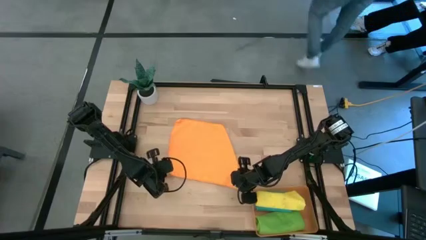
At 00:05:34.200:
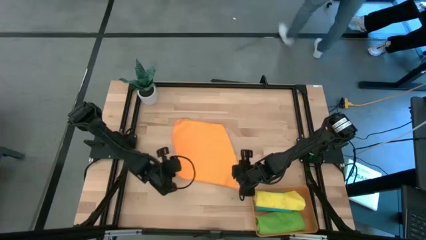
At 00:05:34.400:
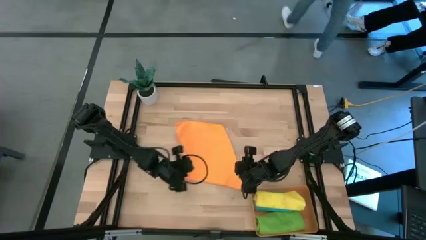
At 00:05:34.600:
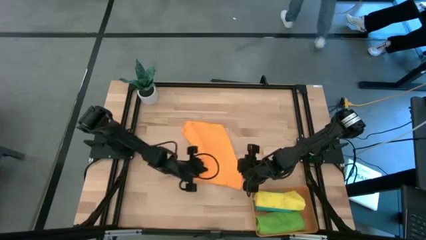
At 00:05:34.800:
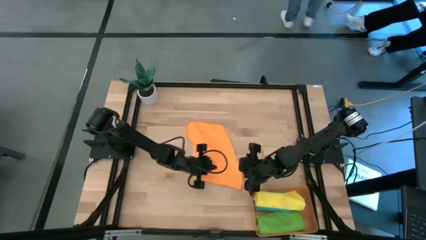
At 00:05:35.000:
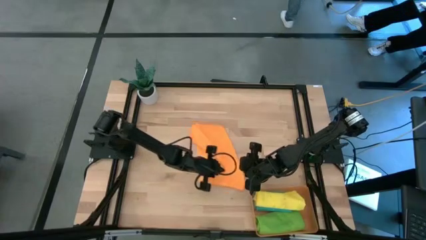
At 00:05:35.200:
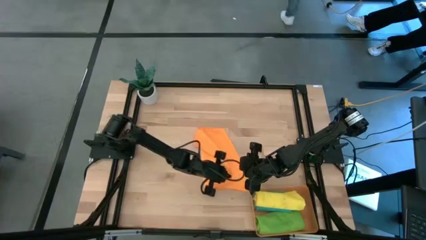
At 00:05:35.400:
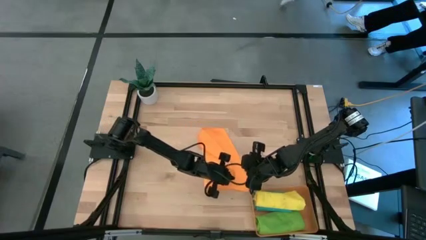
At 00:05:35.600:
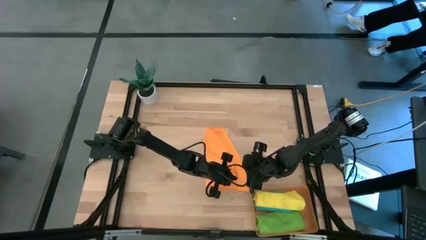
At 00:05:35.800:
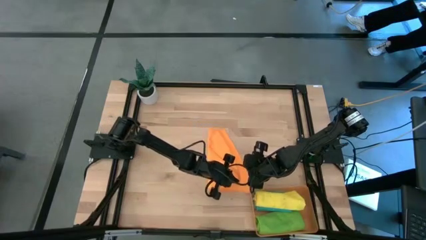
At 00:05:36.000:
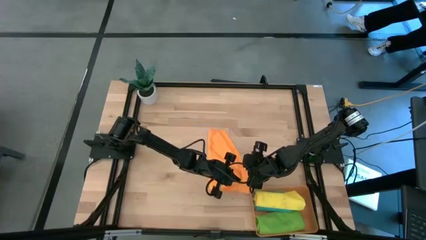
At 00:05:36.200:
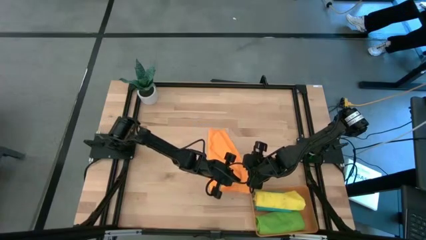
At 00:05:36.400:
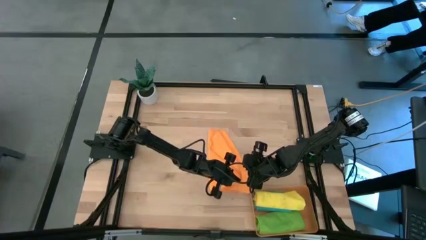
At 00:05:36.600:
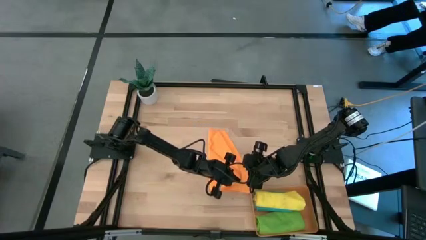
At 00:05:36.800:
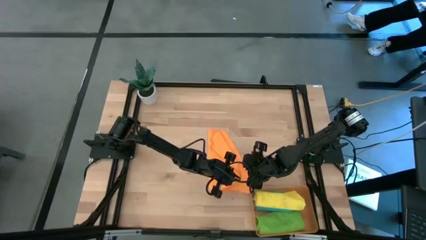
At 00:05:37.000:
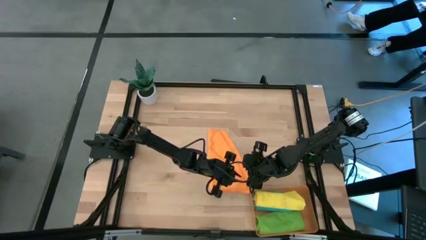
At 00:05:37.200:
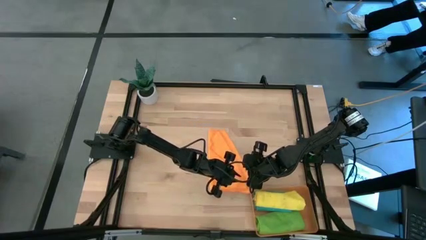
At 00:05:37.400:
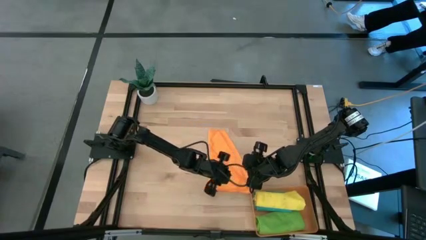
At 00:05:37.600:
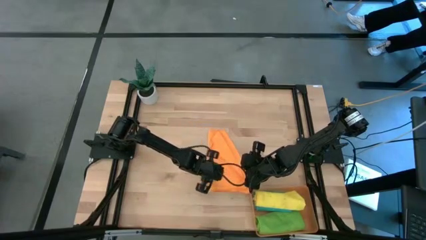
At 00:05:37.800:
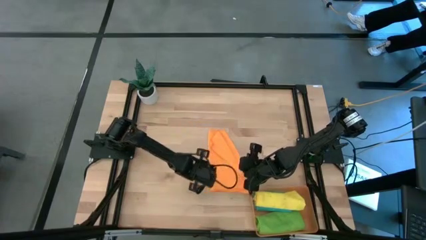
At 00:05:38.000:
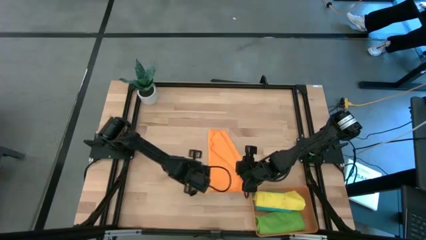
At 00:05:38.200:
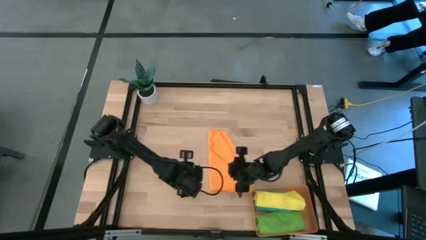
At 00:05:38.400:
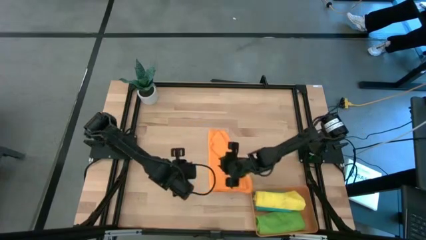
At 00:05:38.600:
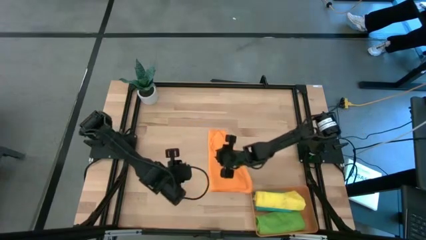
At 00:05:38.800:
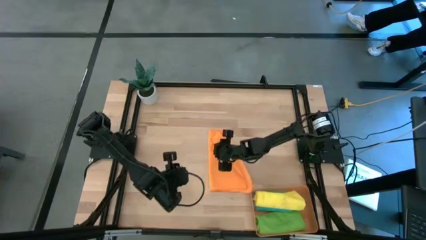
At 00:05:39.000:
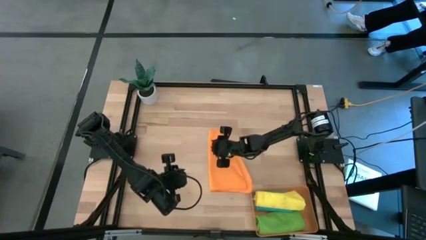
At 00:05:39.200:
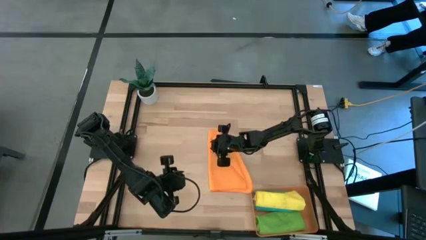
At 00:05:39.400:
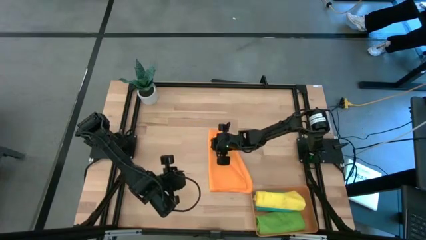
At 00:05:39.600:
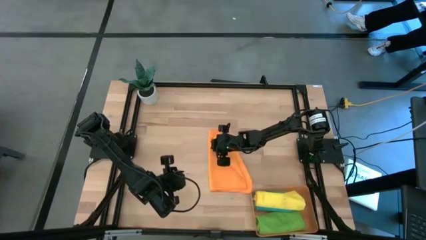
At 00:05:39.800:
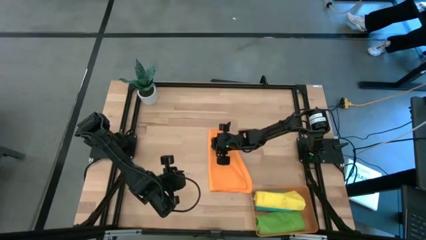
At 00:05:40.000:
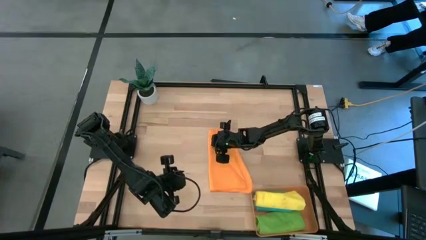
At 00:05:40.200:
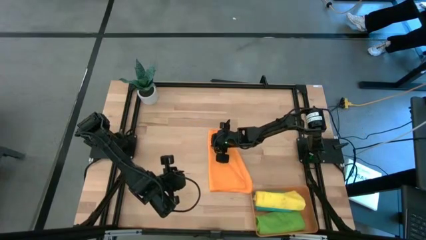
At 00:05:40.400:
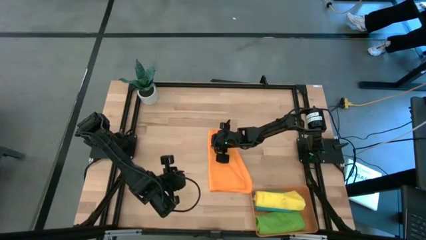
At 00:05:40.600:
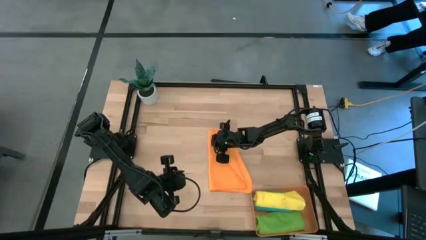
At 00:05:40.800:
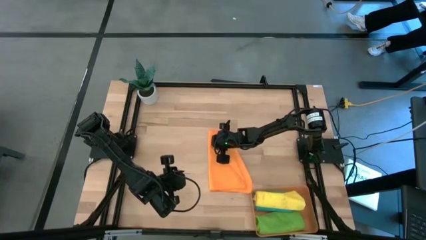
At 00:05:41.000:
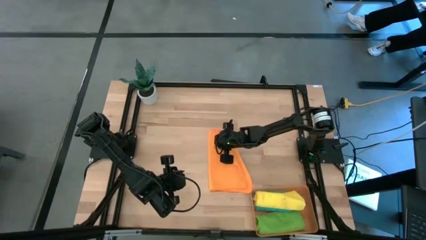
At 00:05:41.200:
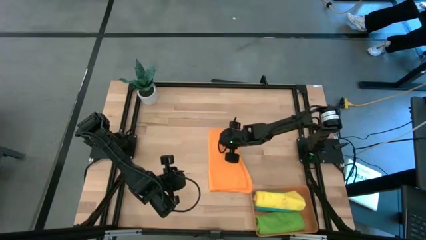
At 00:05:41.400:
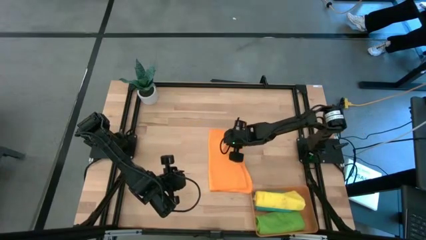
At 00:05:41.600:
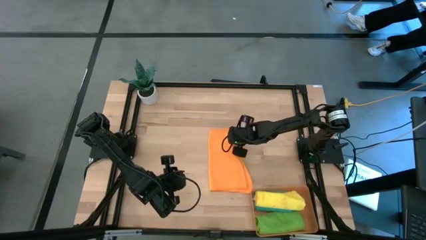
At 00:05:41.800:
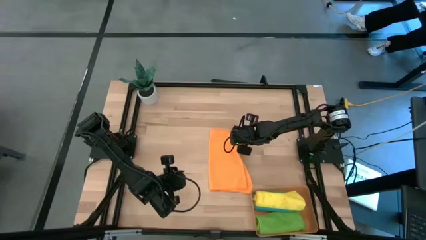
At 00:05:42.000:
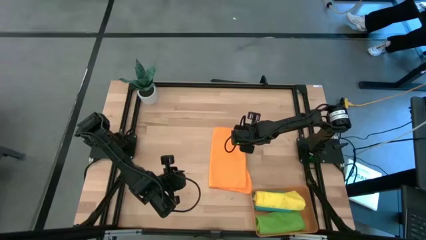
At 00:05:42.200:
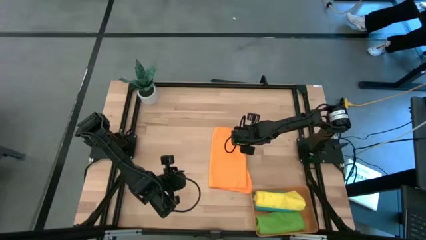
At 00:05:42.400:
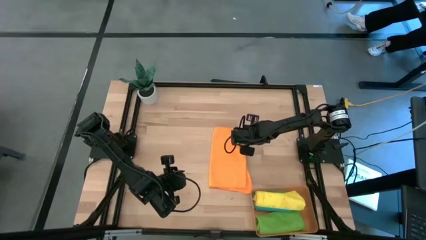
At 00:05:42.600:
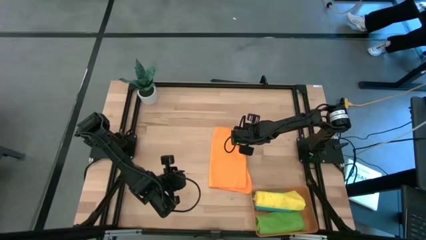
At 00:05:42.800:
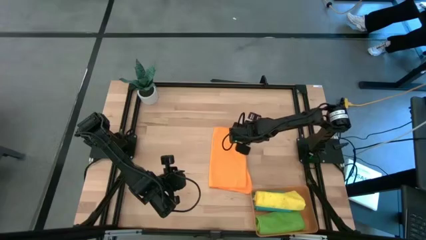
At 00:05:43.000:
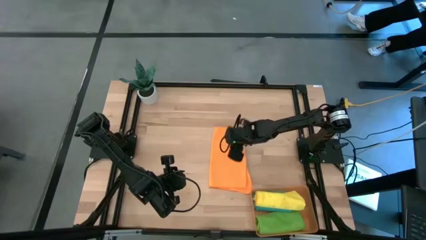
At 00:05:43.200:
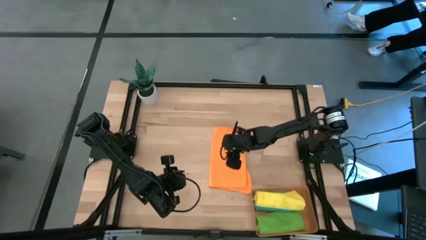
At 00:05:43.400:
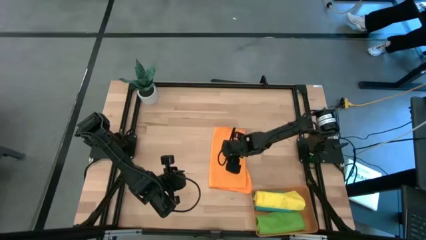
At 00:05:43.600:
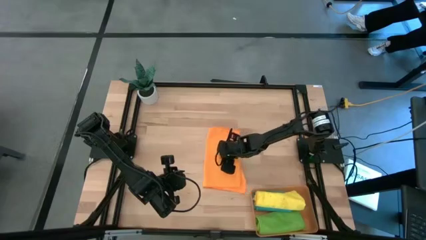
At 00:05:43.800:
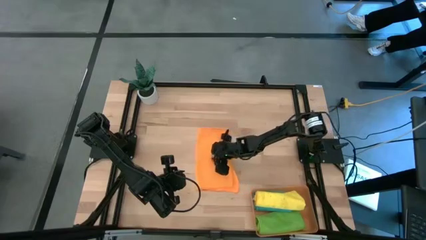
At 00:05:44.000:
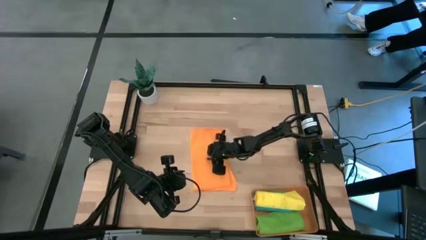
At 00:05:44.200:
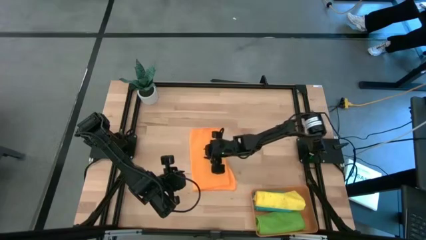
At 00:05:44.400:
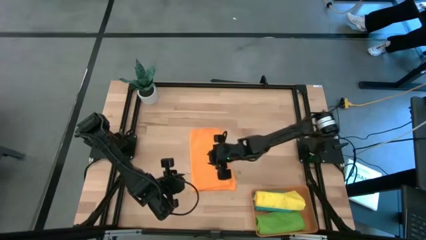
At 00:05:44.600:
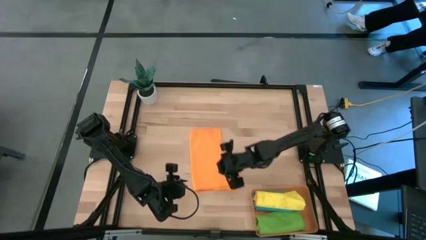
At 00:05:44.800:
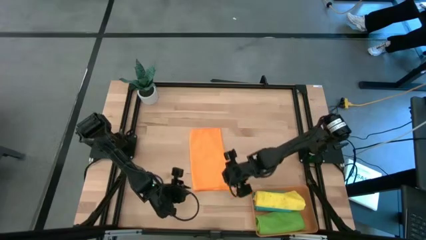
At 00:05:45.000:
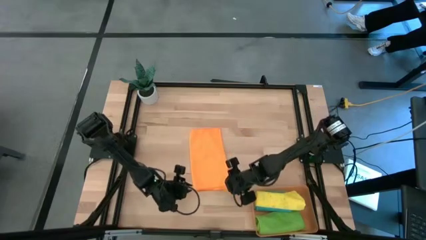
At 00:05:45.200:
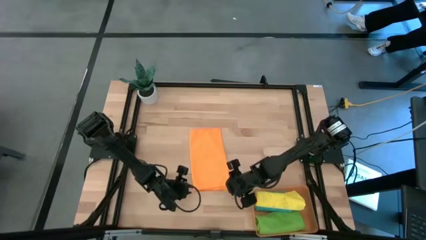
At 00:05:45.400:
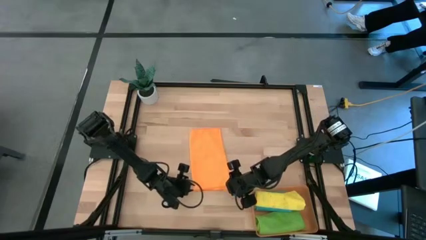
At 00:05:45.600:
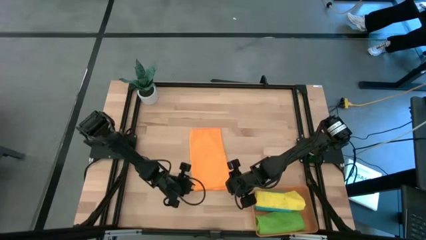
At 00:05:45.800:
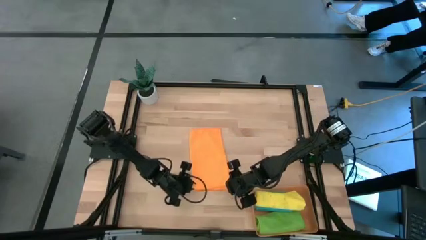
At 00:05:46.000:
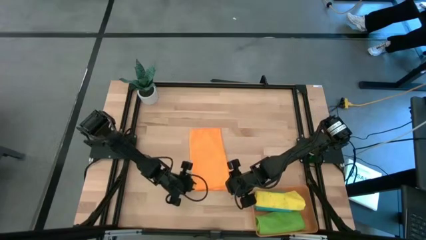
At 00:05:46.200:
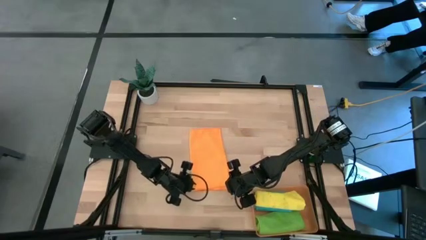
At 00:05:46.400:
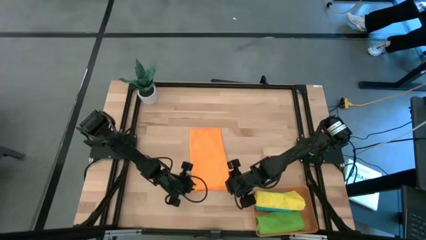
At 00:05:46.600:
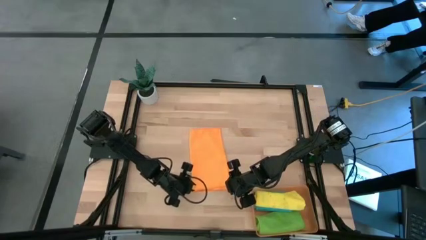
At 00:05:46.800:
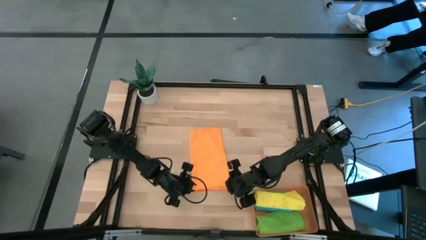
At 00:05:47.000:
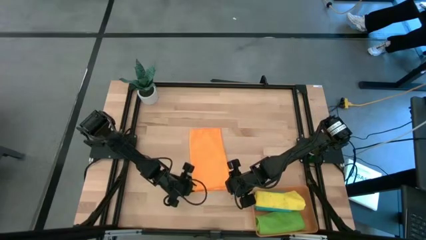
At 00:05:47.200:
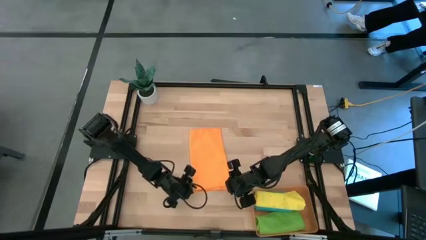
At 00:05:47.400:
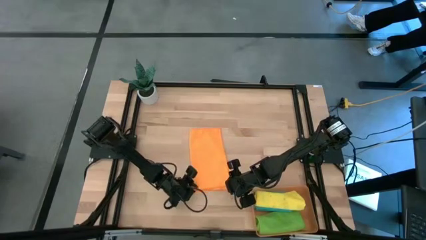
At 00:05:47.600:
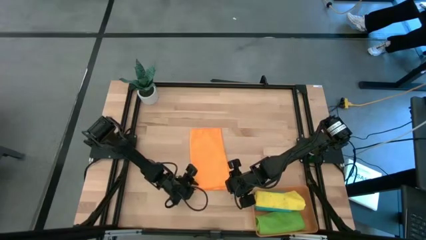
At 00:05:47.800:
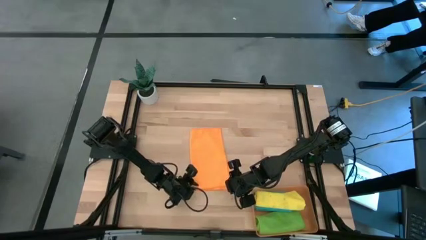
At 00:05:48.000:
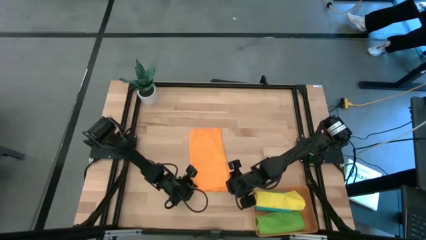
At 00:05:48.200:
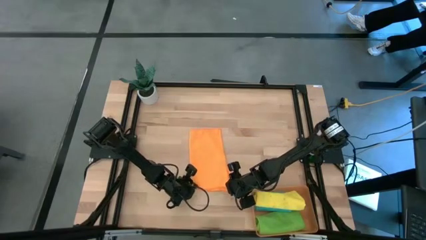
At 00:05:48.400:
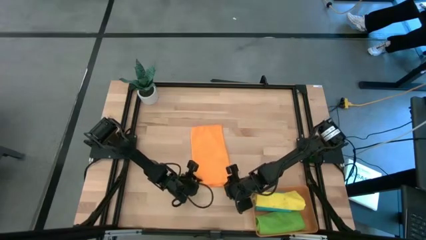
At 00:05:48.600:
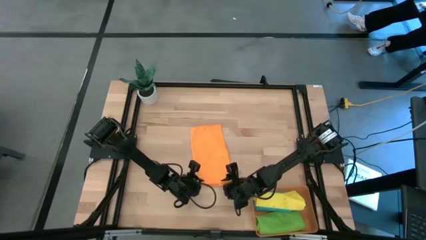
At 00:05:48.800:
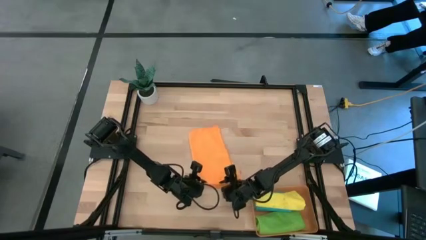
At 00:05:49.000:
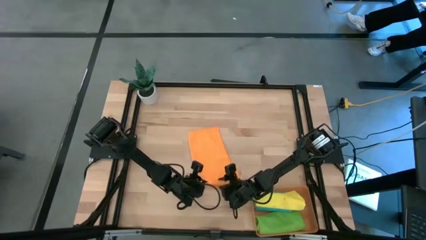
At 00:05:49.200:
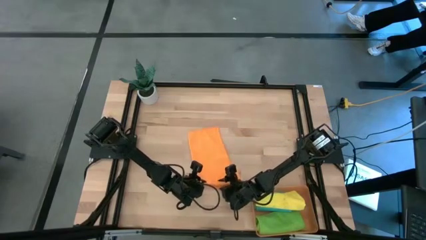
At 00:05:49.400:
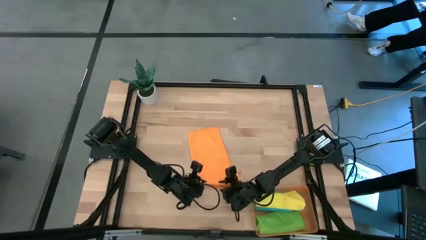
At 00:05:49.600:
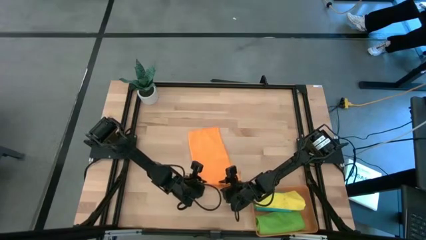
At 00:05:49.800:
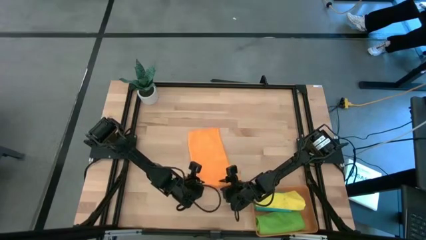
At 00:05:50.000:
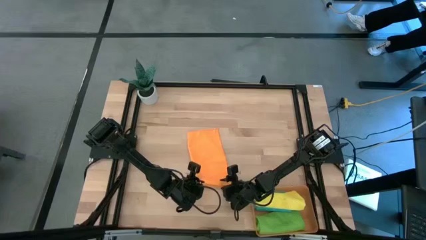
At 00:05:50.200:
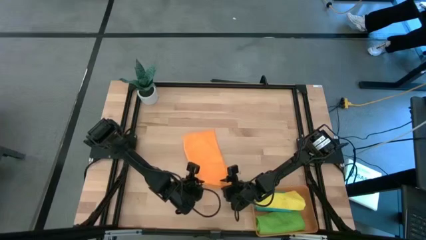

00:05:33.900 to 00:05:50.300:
Task: Roll microfiber towels into tight, uniform cylinder then place into a basket
Roll the orange microfiber towel
